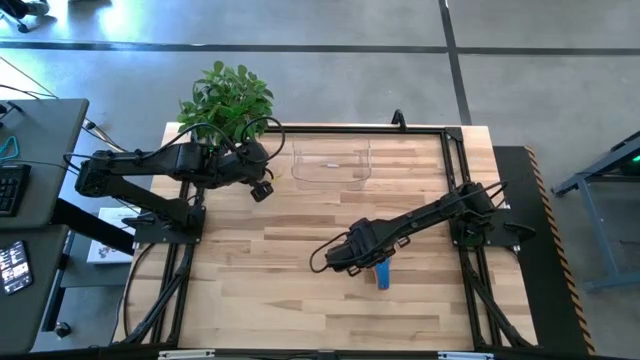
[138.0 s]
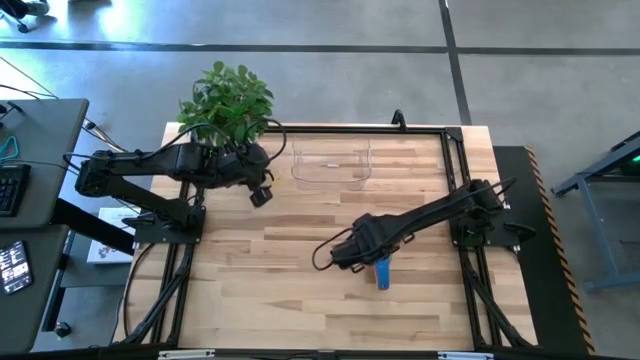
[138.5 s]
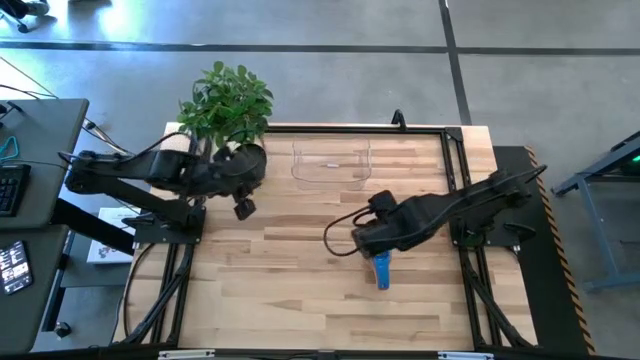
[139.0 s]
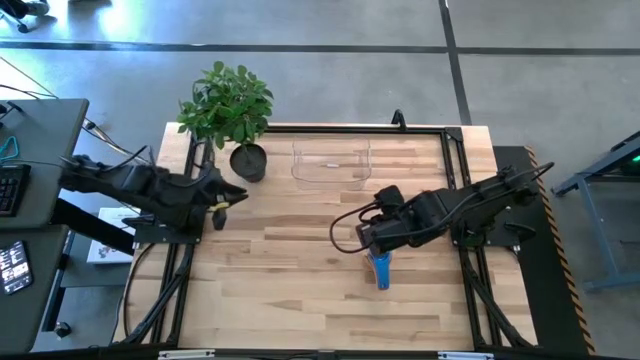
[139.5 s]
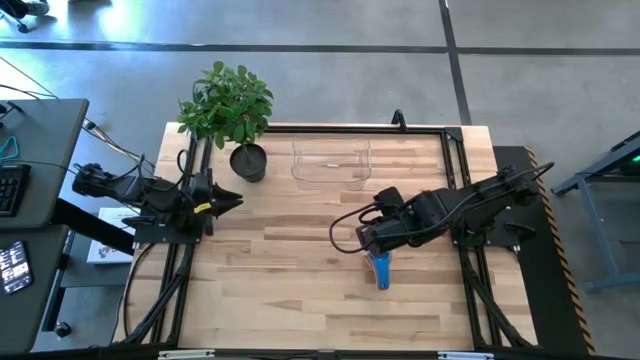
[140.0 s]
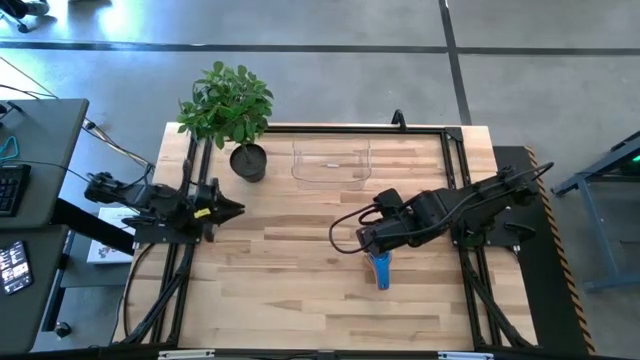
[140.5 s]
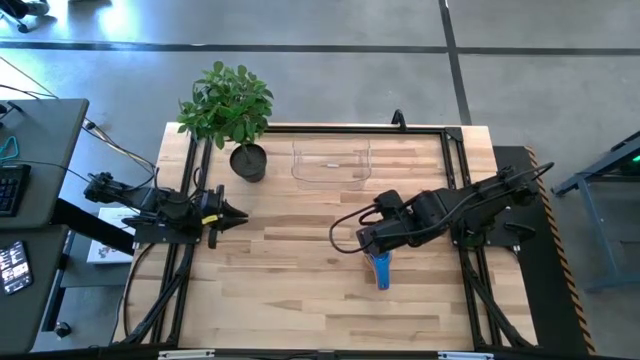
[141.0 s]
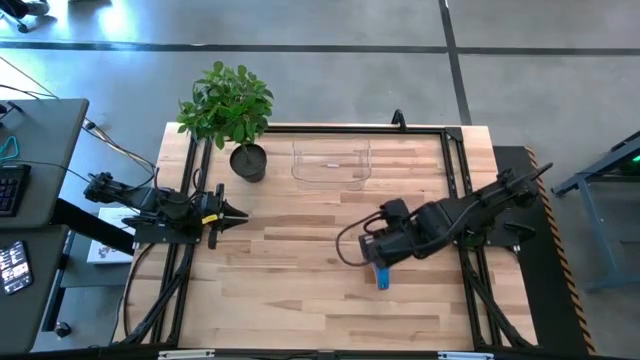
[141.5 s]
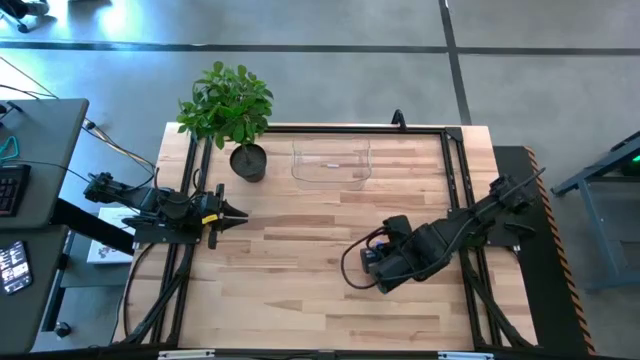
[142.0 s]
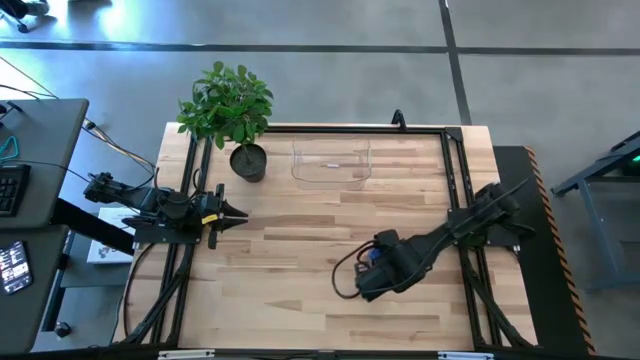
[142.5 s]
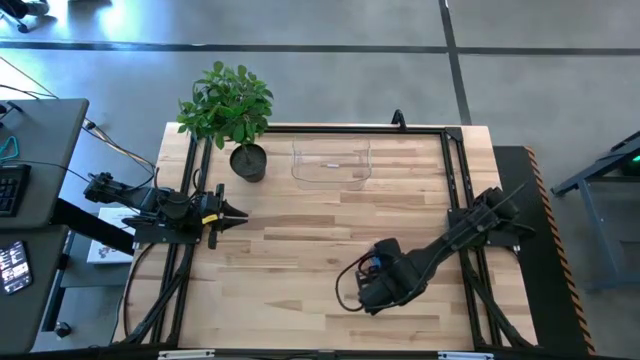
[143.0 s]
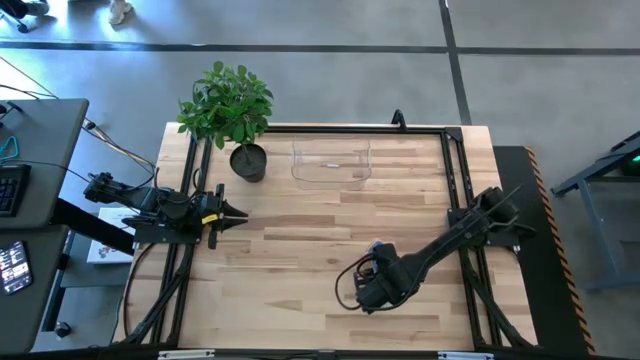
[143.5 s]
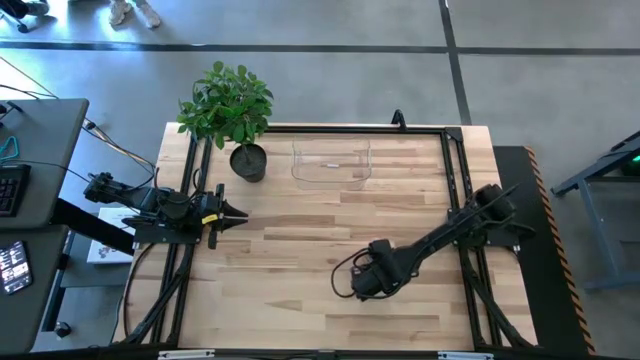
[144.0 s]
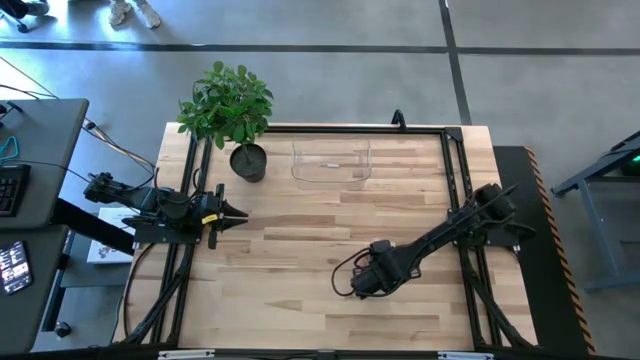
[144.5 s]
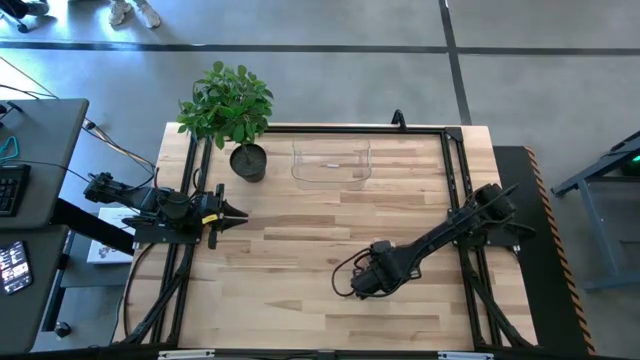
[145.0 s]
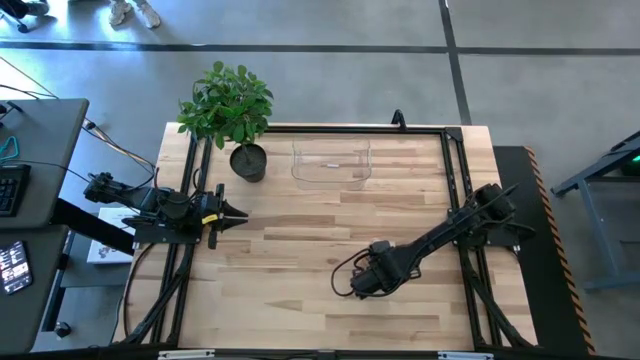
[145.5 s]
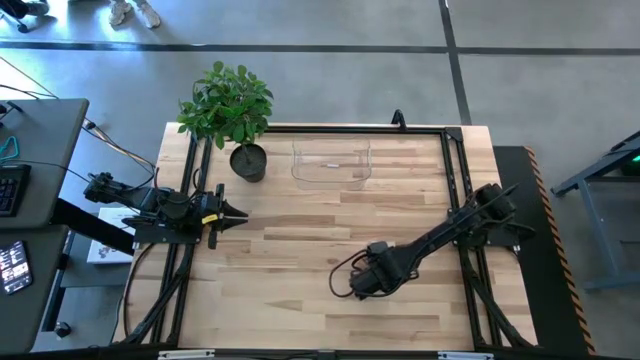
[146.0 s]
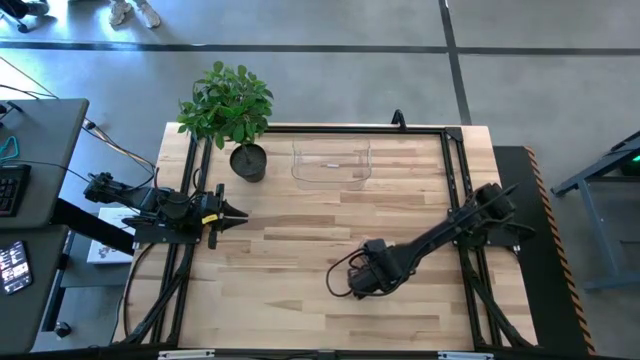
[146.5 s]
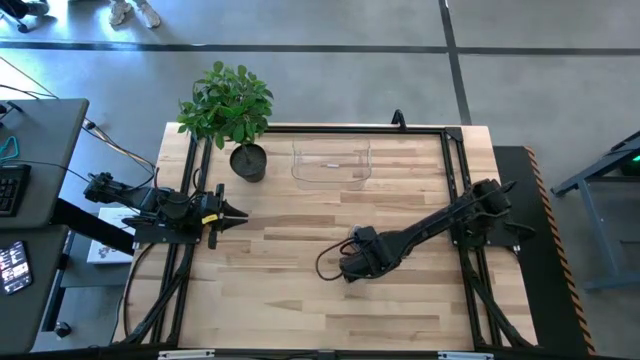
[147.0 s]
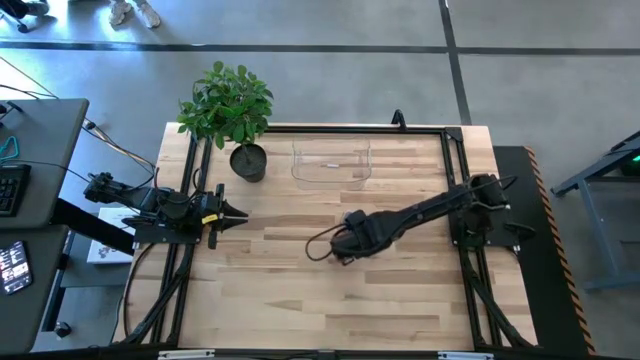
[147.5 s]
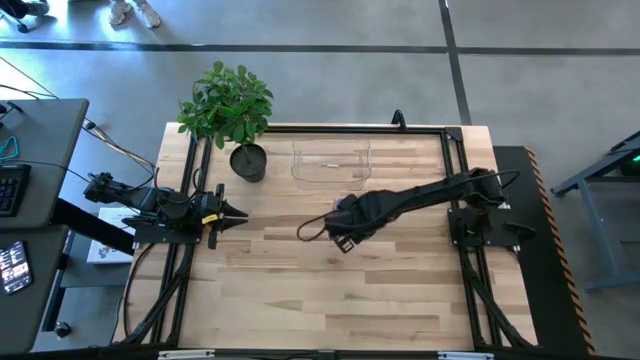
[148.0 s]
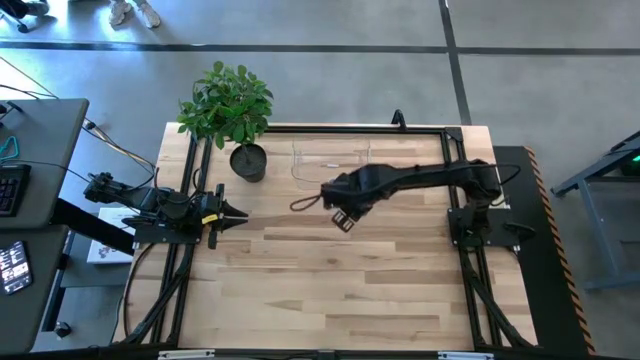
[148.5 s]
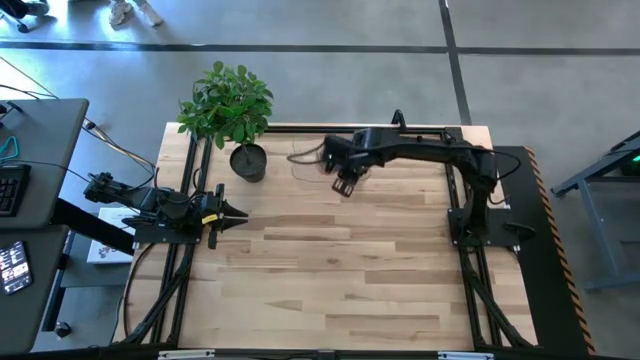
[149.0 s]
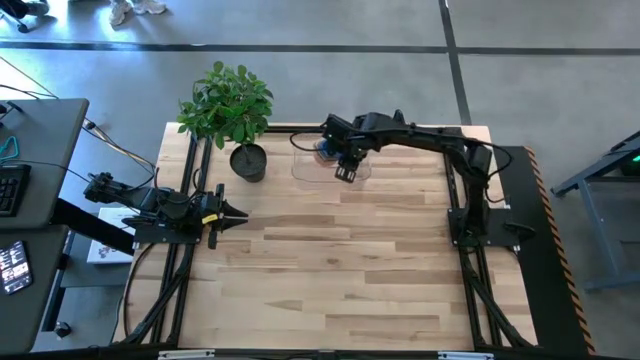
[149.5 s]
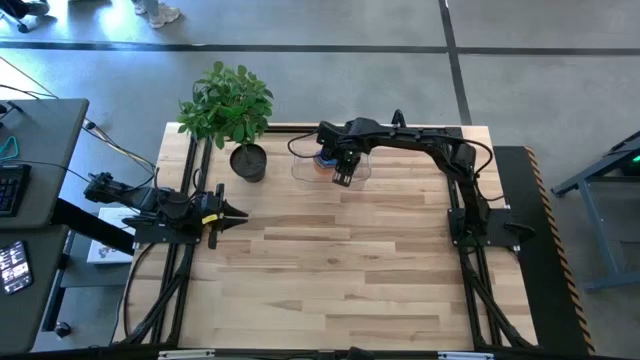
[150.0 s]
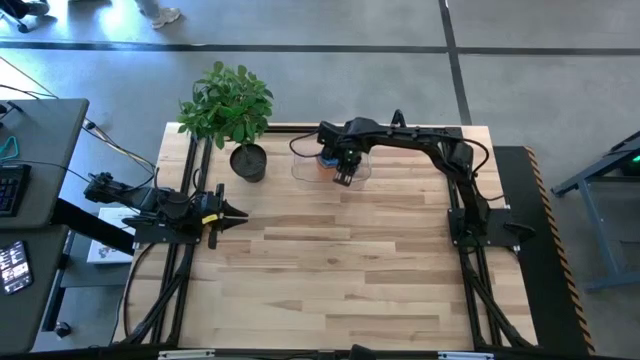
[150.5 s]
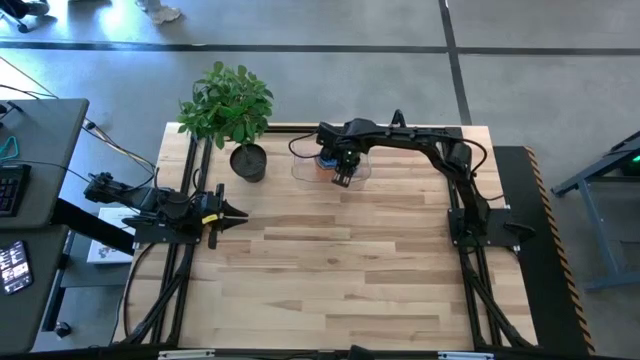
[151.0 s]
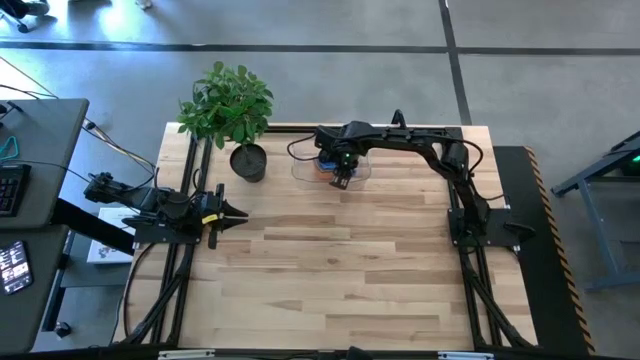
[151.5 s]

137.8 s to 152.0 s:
Task: Nest measuring cups in basket
Put the nested measuring cups into the transparent bin

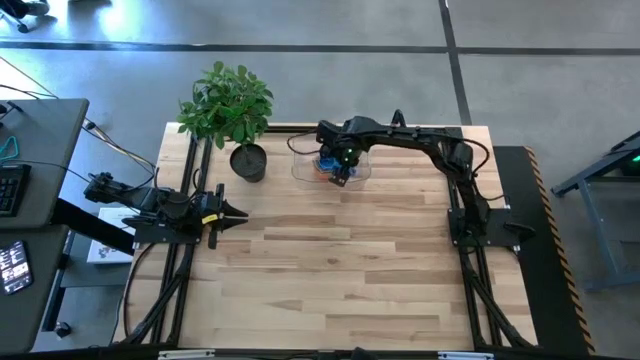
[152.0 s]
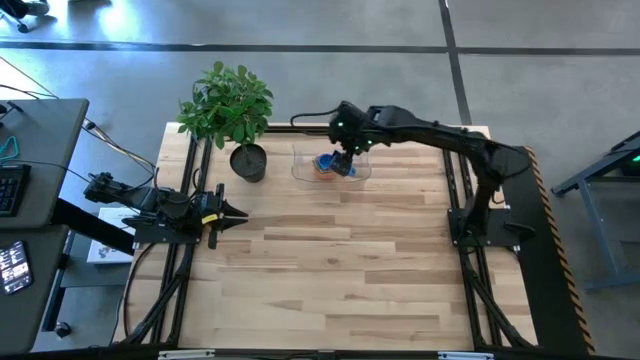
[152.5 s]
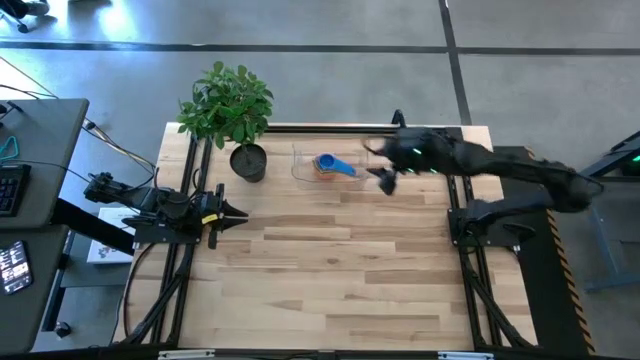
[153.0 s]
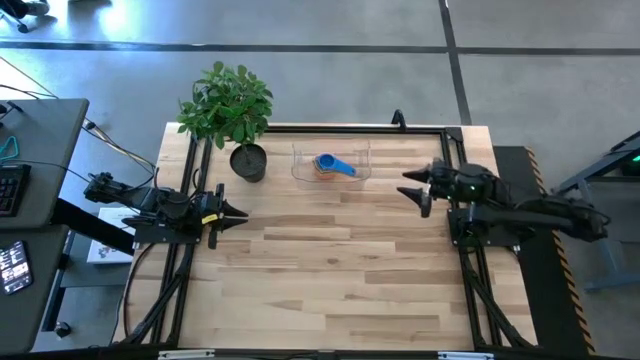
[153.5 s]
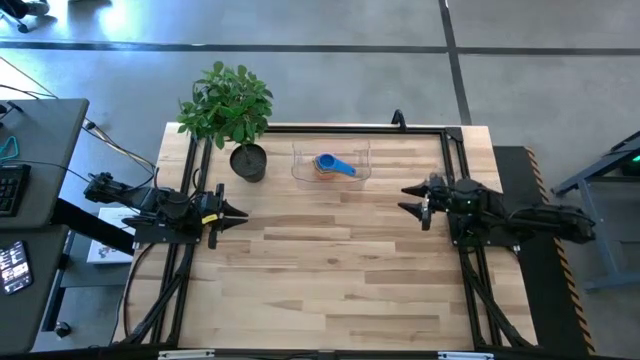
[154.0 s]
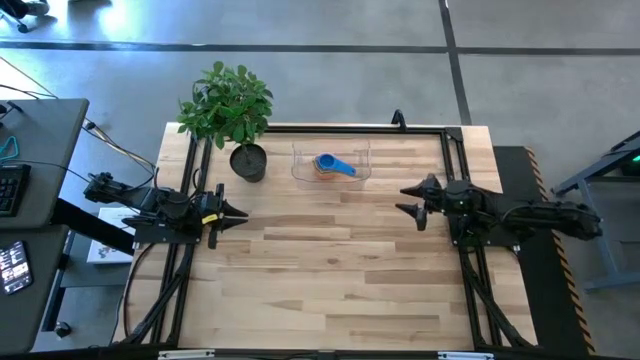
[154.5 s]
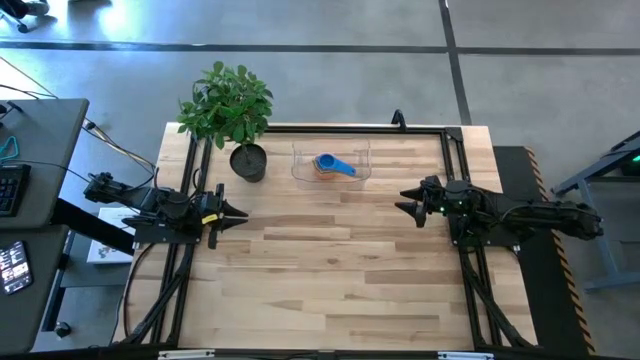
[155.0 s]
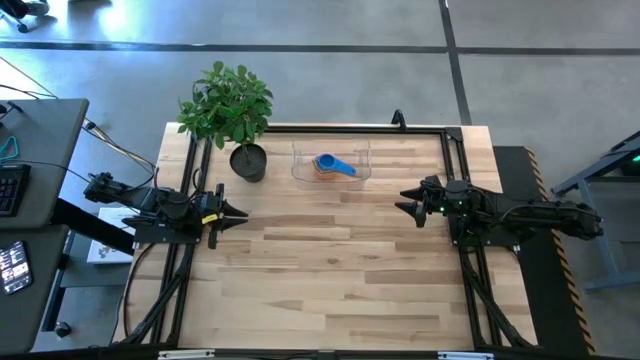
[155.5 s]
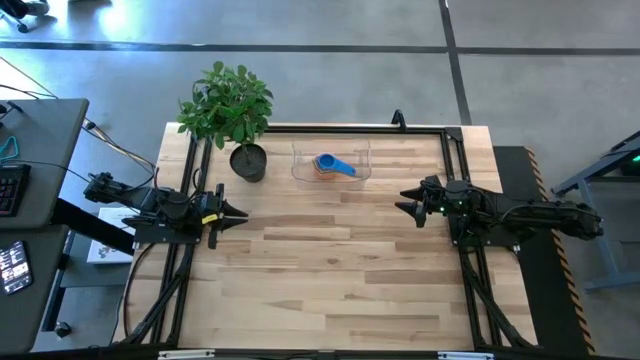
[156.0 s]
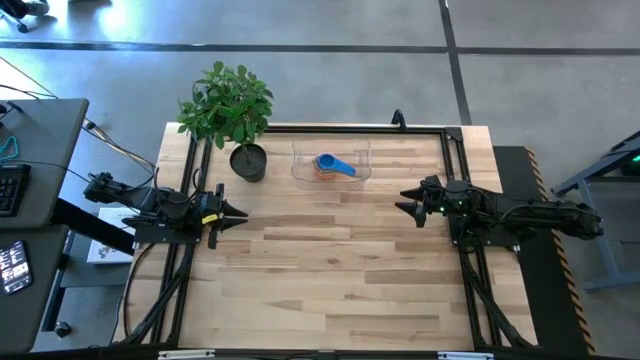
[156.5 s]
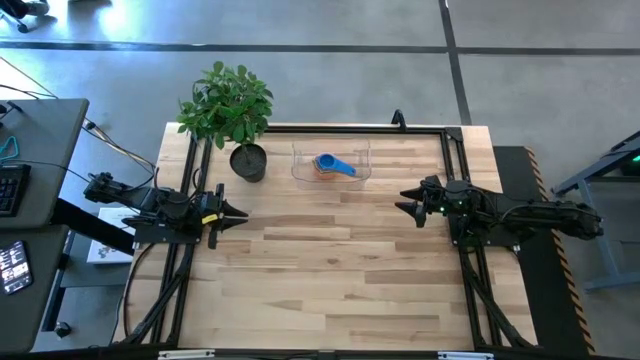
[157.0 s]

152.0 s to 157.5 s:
Return to Home Position

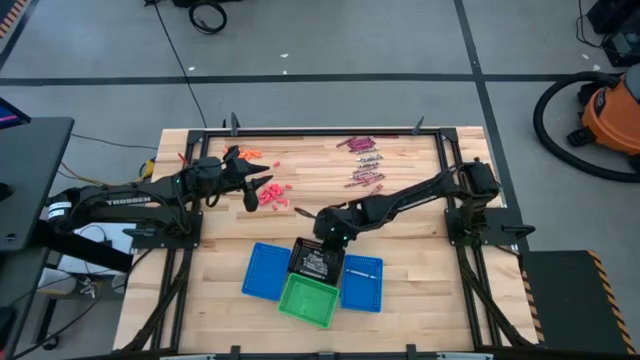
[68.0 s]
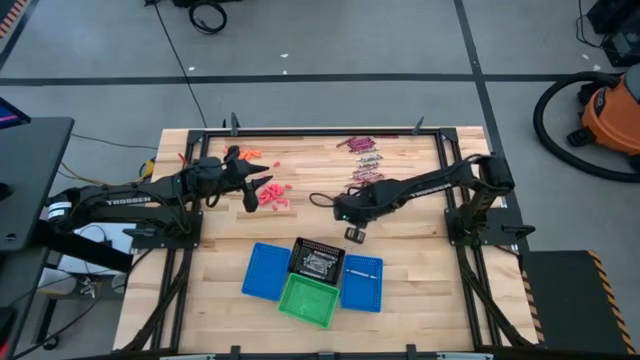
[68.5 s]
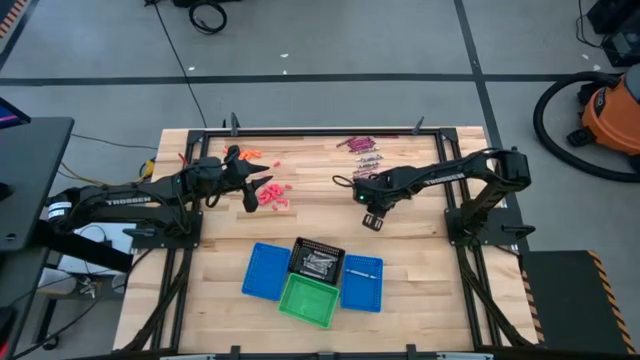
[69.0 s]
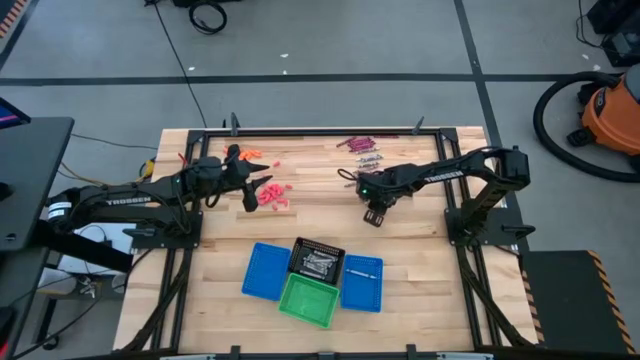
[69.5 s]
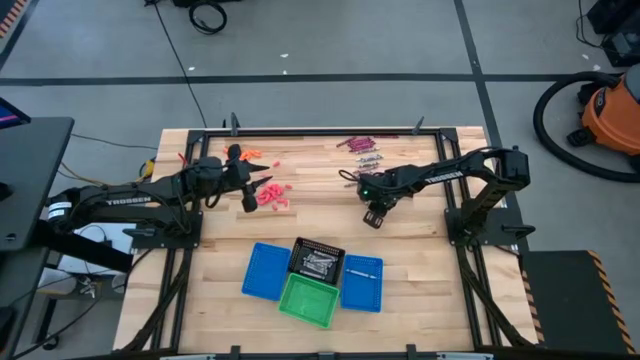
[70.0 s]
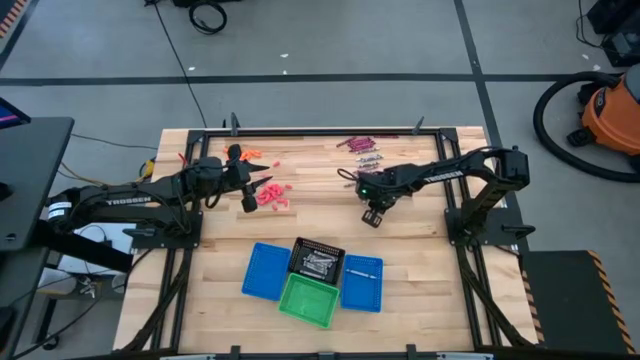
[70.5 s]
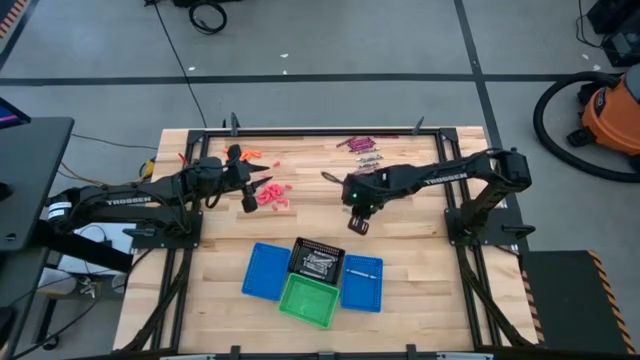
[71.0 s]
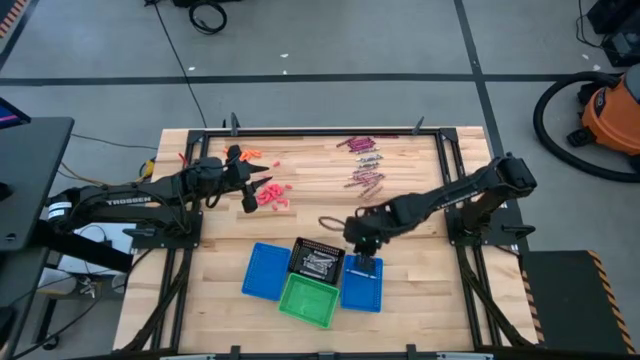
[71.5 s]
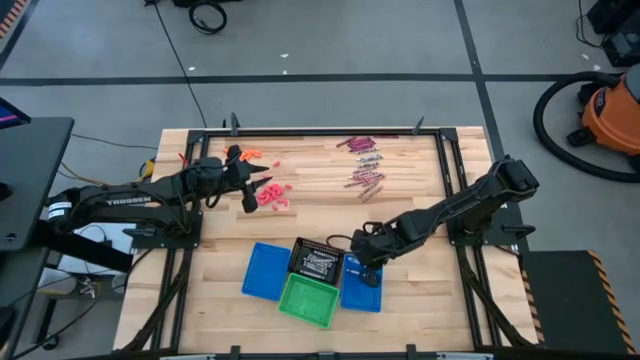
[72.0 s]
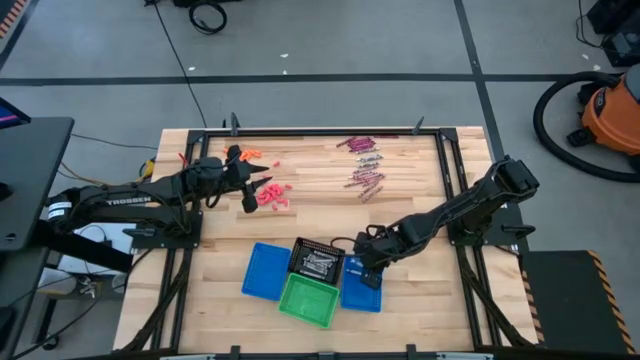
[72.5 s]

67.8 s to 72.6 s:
Task: Sort crayons
Put the white crayon into the right blue bin
